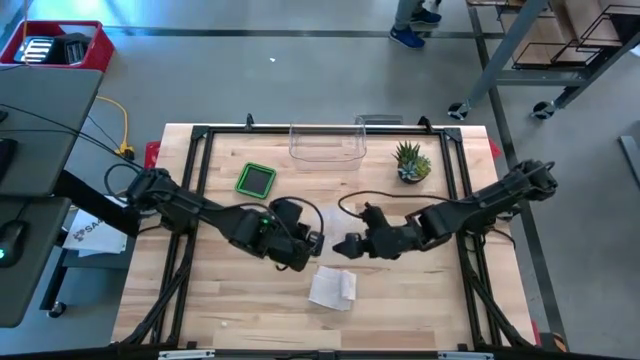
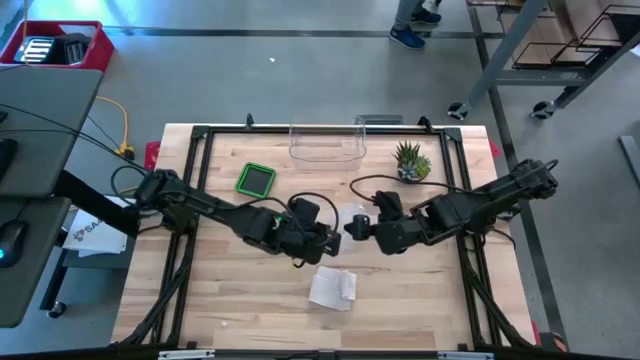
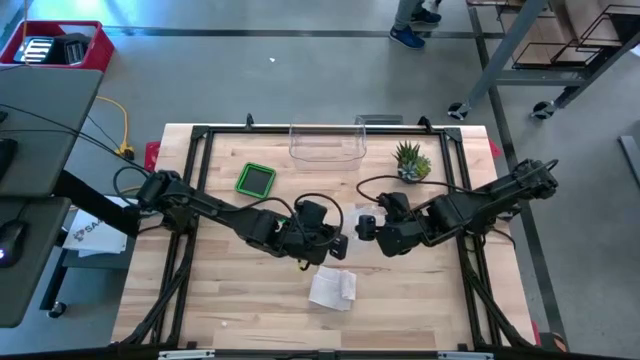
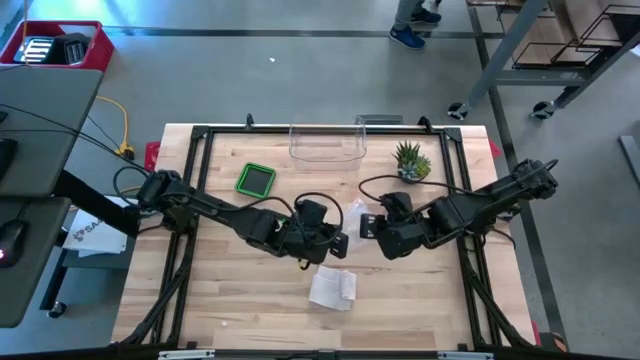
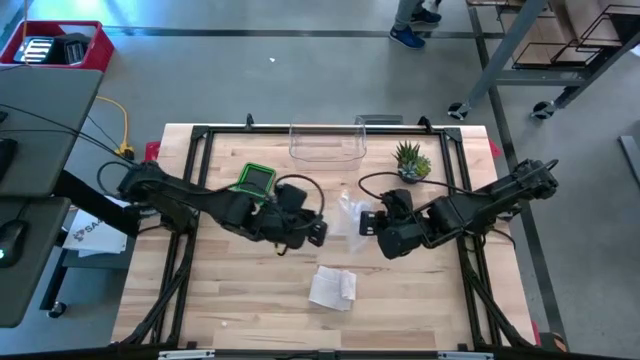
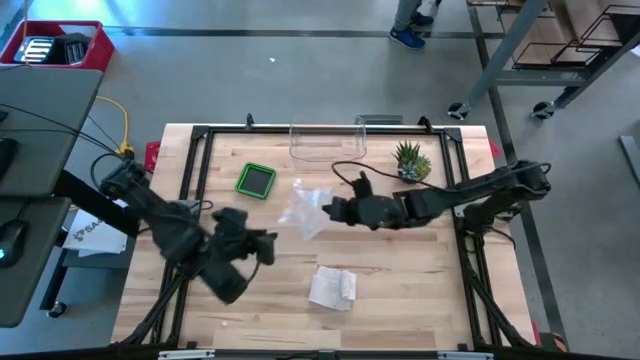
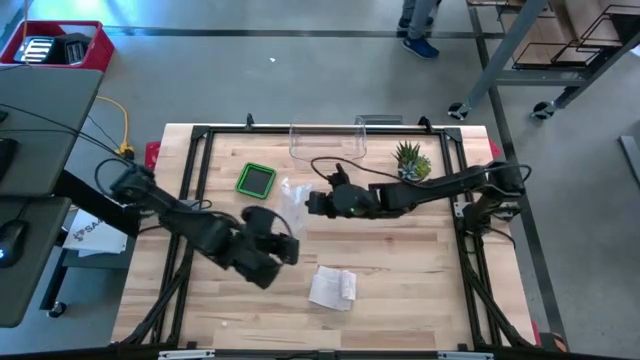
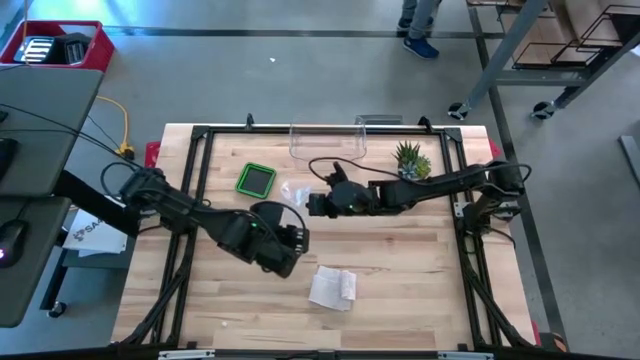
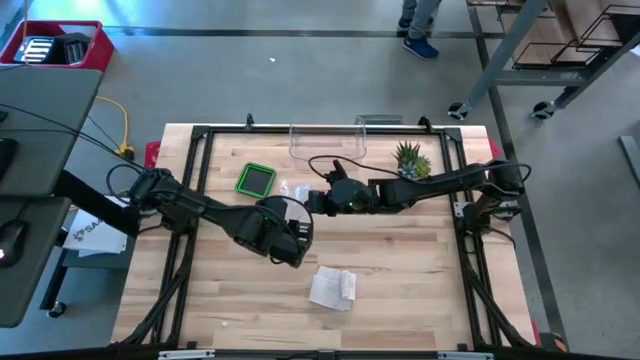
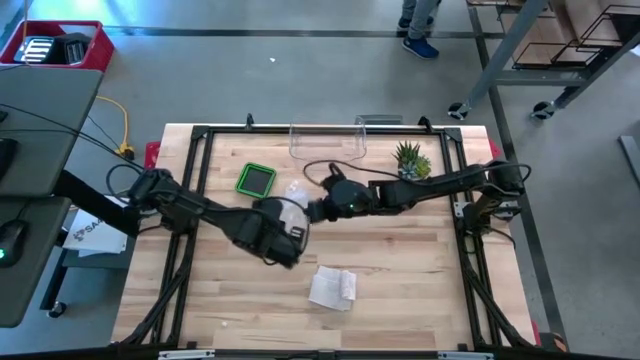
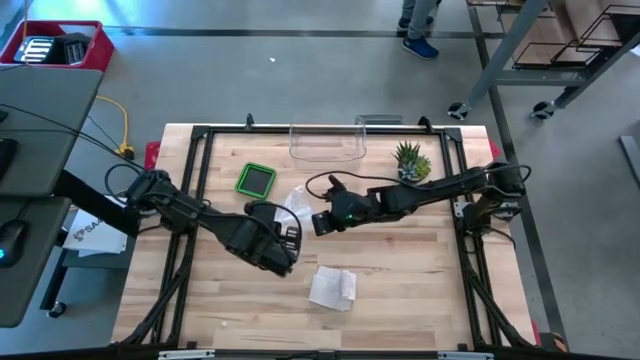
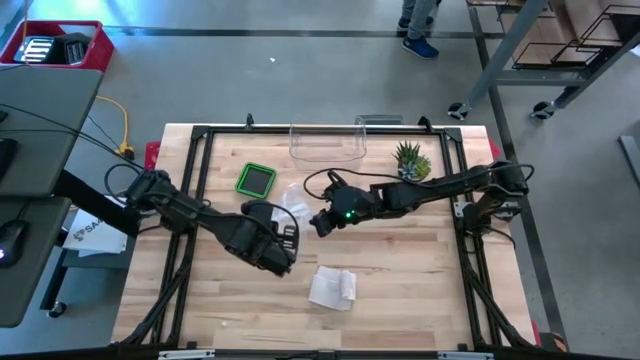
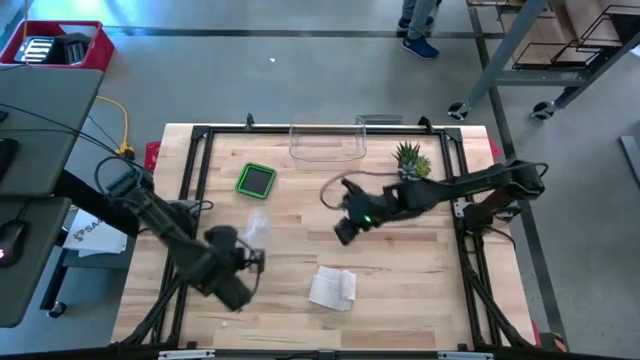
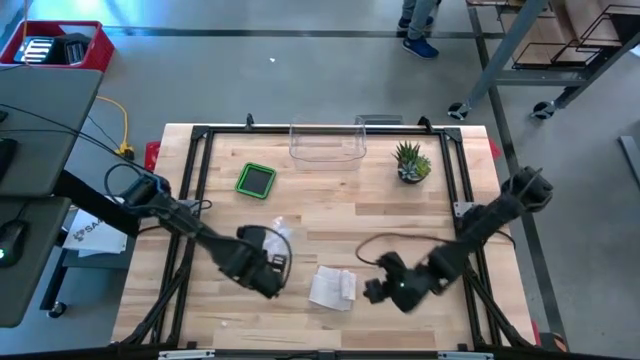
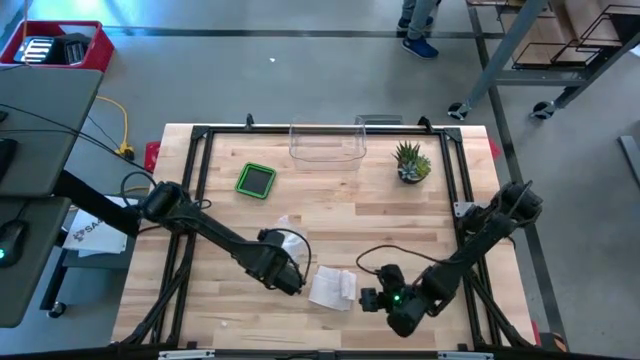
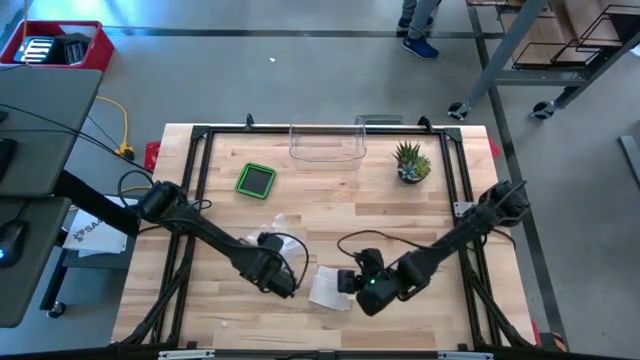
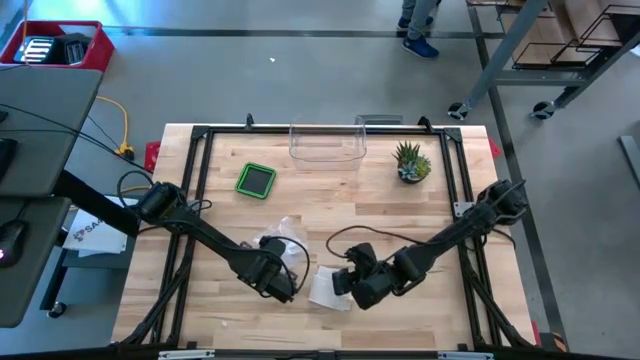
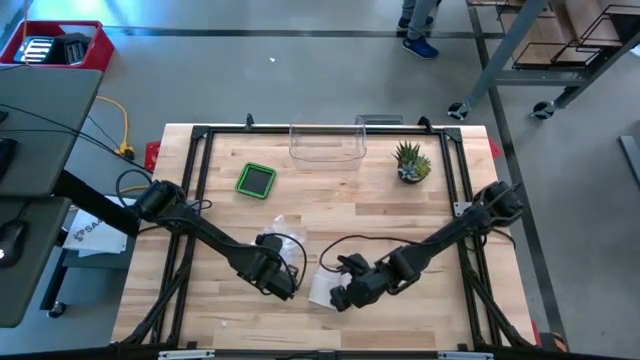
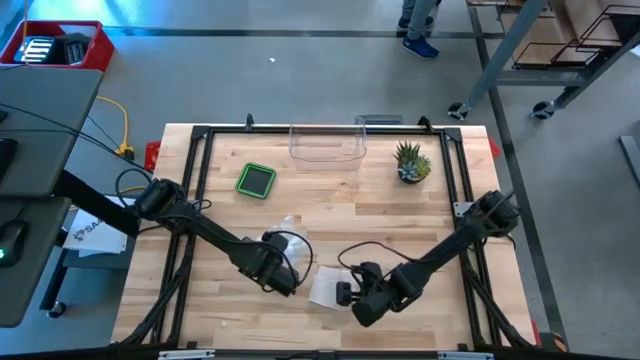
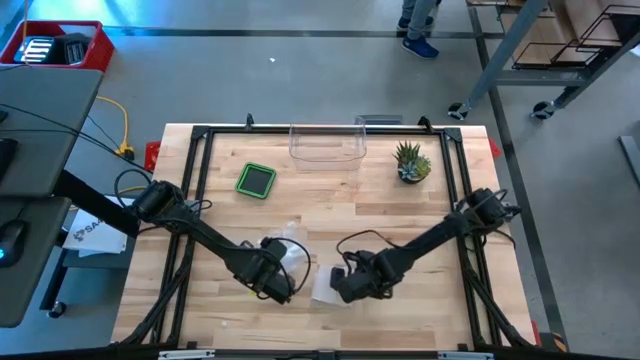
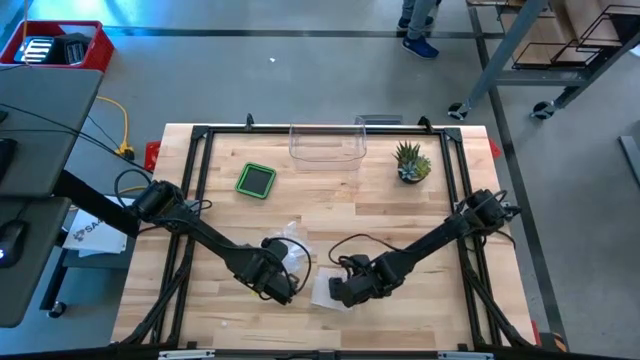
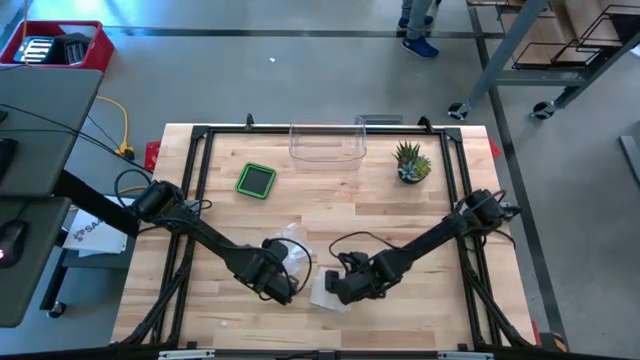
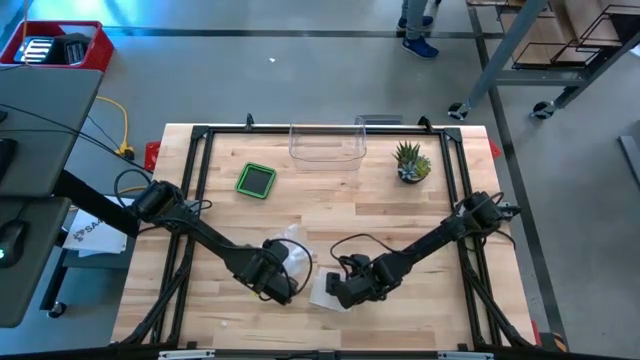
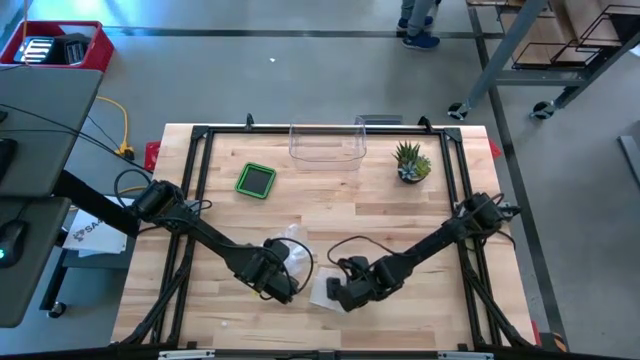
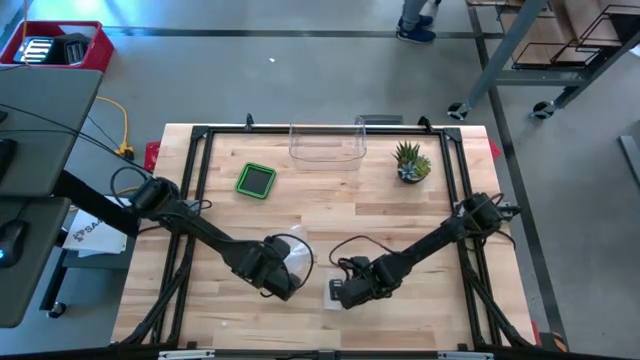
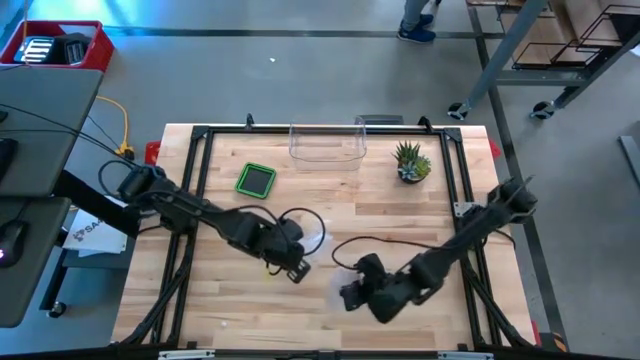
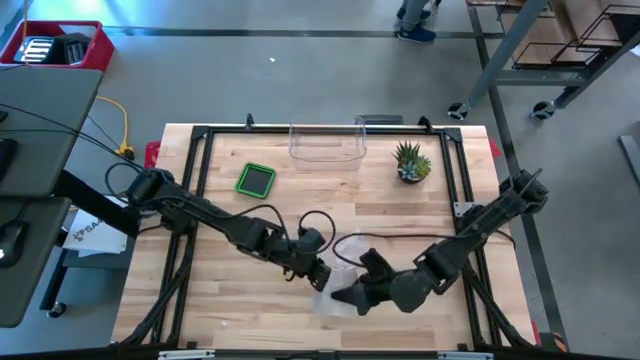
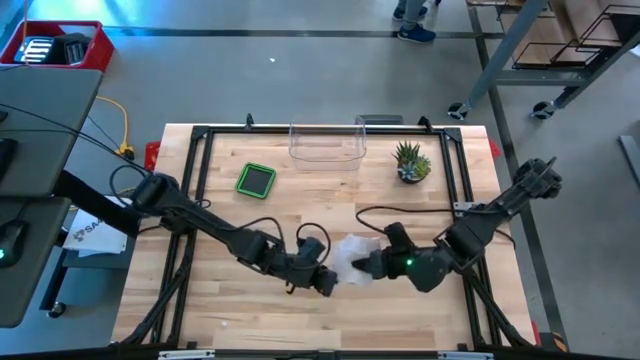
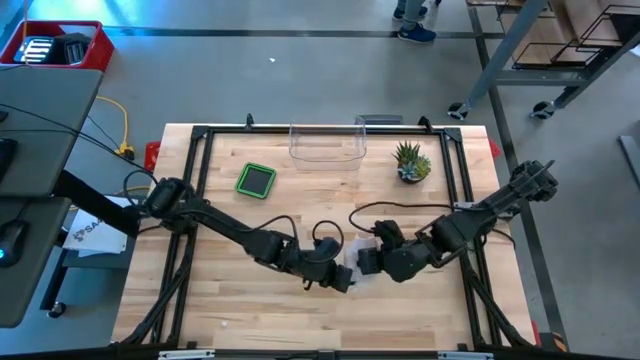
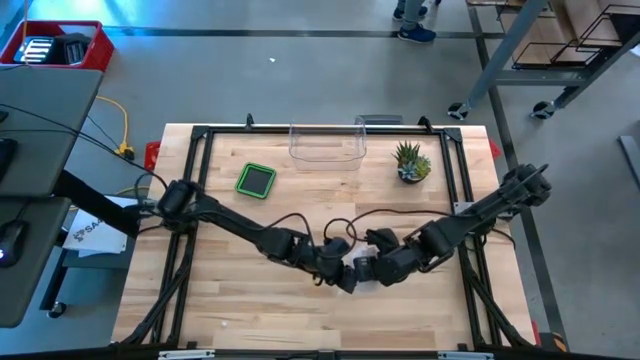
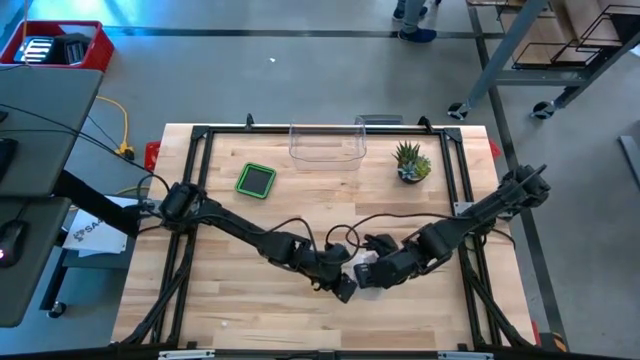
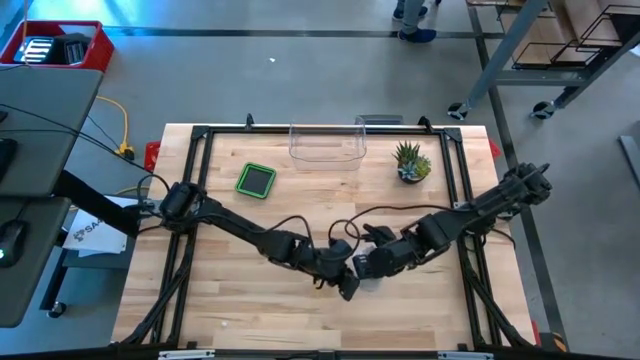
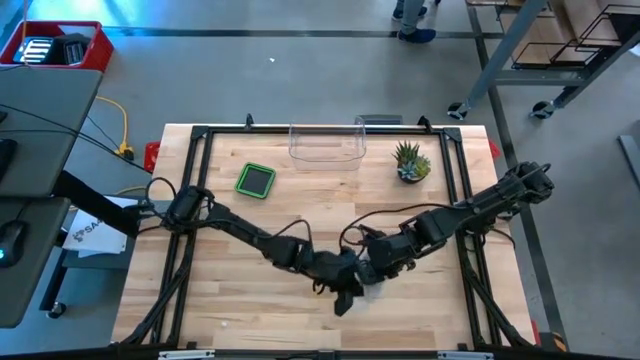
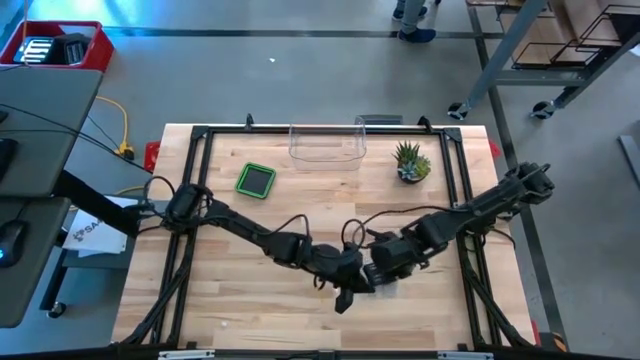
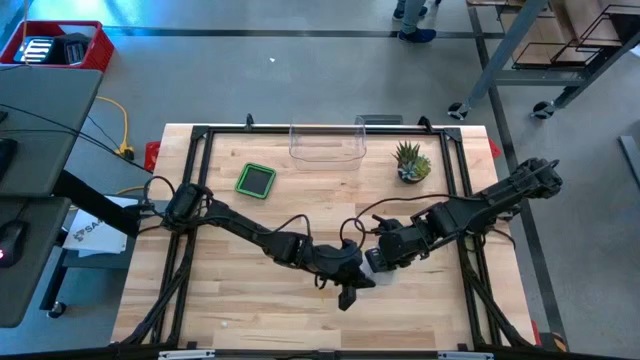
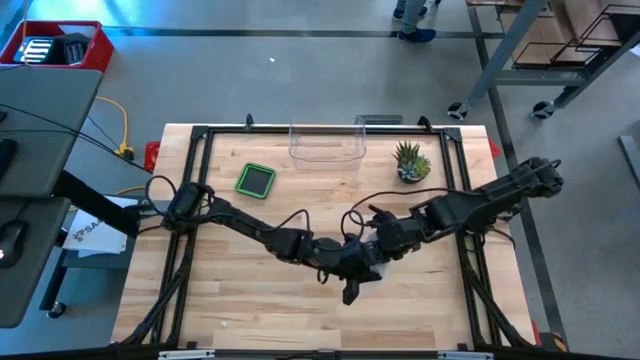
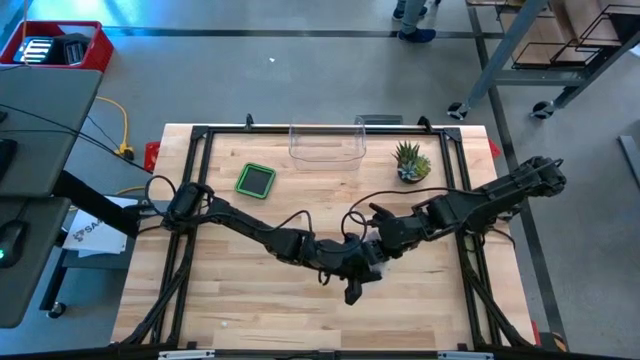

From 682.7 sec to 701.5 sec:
Task: Roll bandage
Put the rolled bandage into the transparent zip bag
